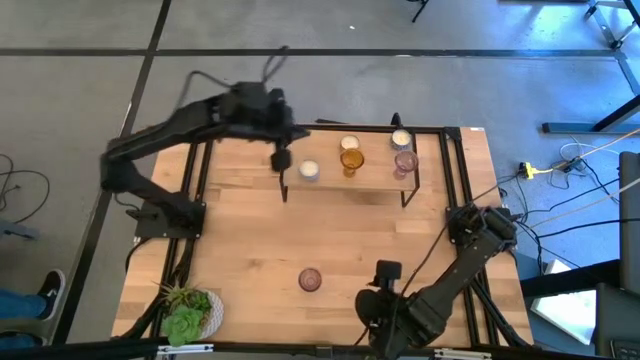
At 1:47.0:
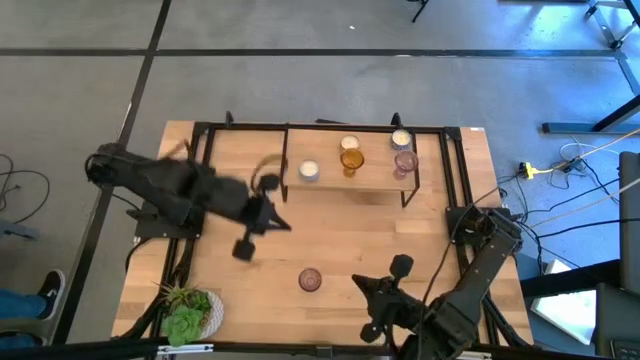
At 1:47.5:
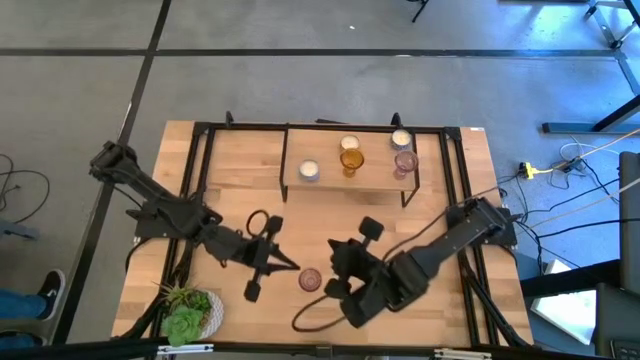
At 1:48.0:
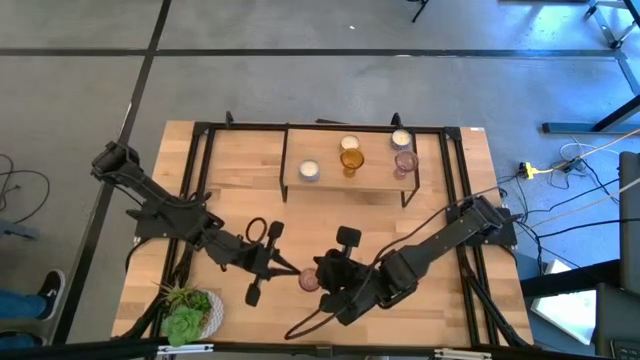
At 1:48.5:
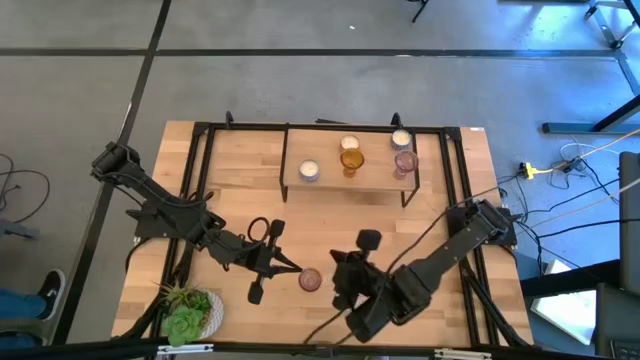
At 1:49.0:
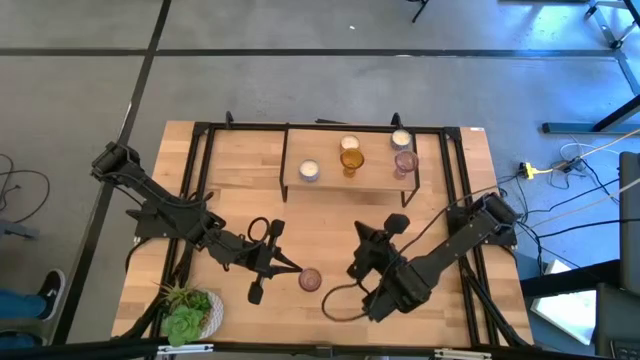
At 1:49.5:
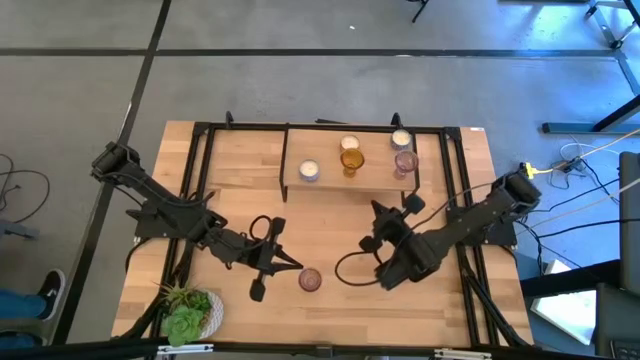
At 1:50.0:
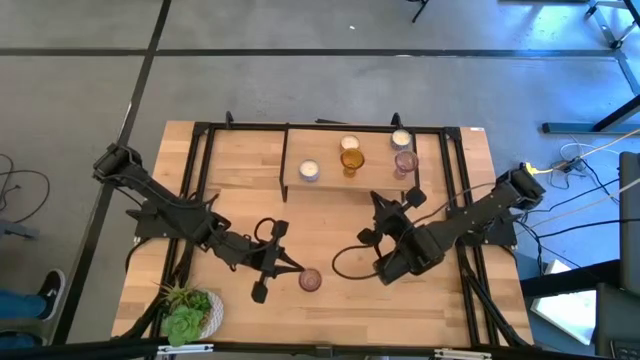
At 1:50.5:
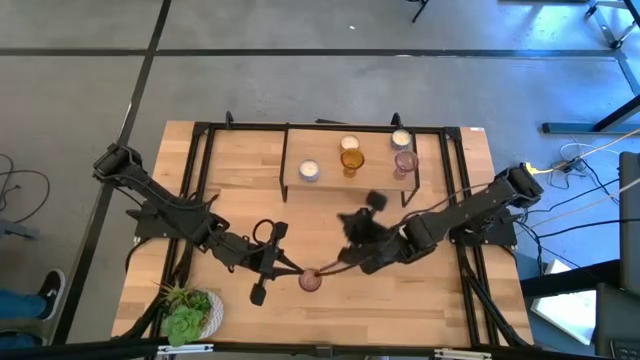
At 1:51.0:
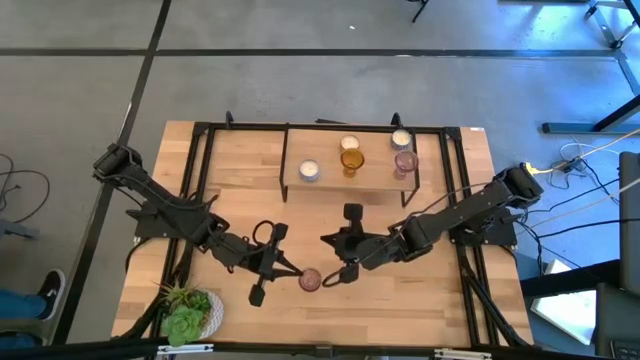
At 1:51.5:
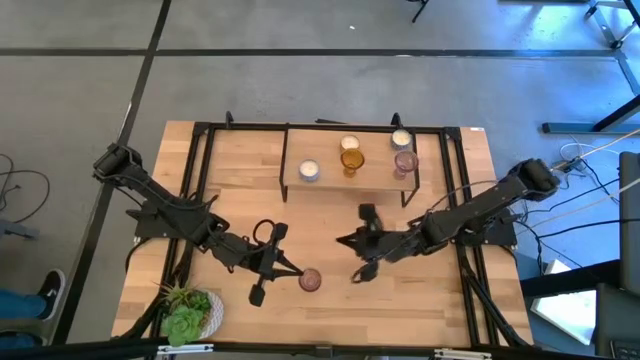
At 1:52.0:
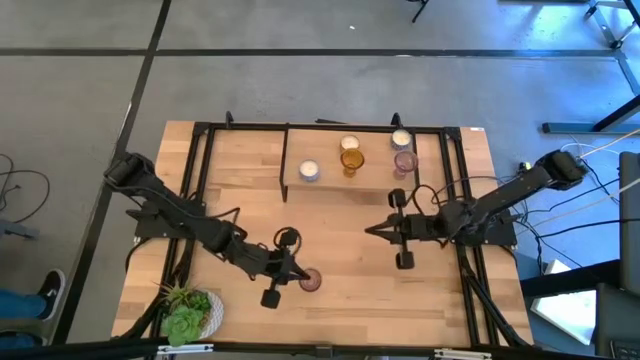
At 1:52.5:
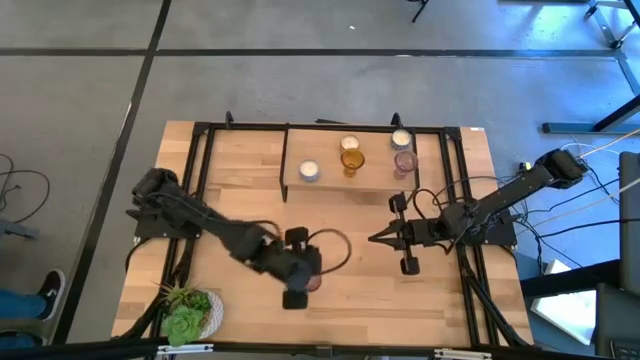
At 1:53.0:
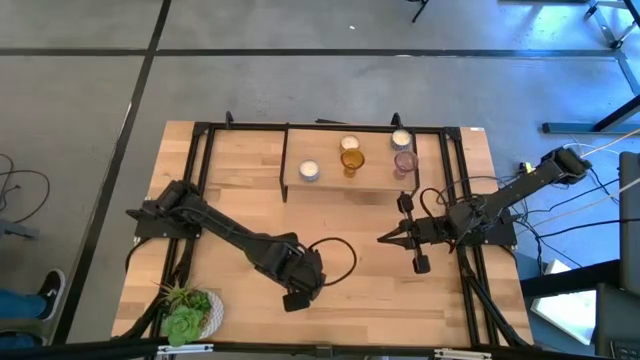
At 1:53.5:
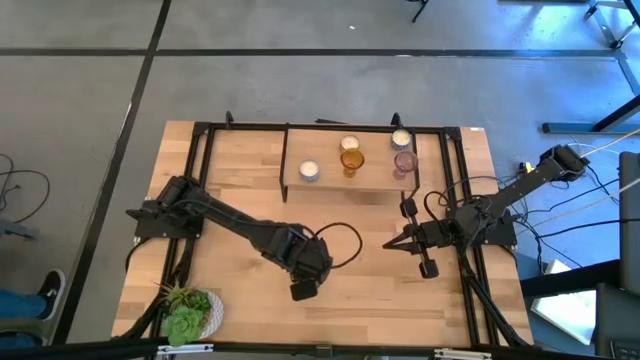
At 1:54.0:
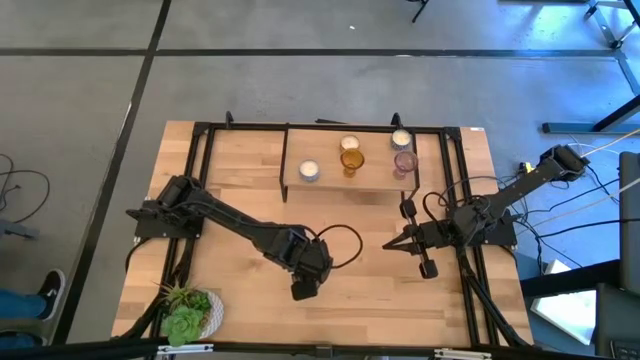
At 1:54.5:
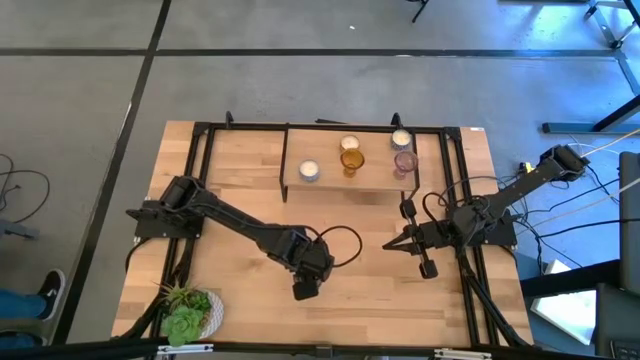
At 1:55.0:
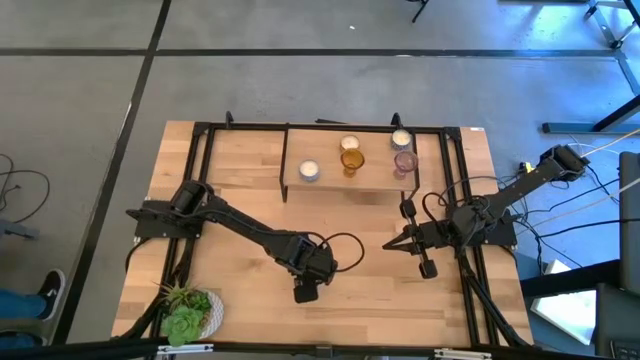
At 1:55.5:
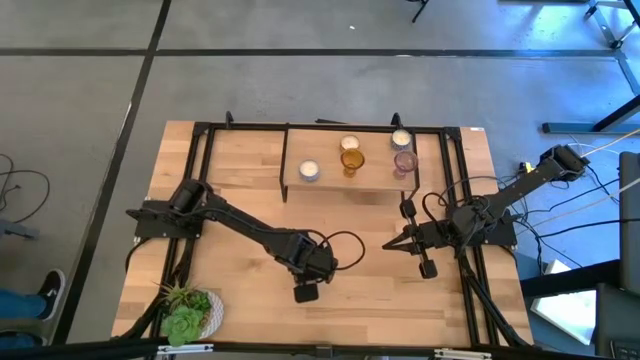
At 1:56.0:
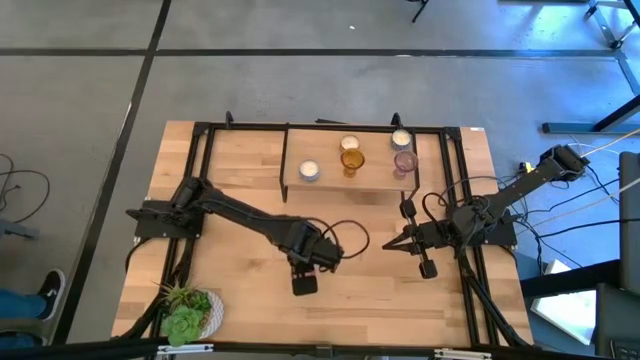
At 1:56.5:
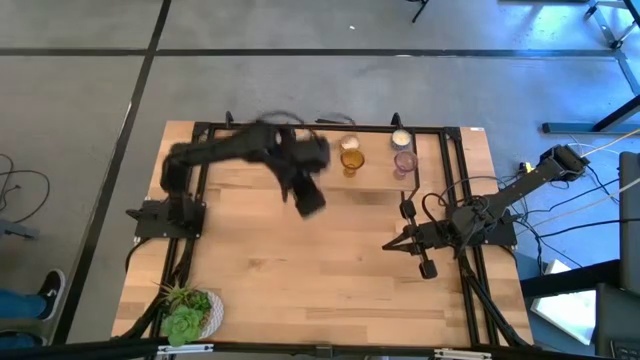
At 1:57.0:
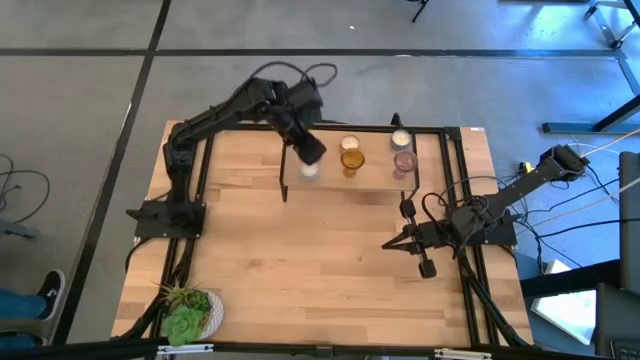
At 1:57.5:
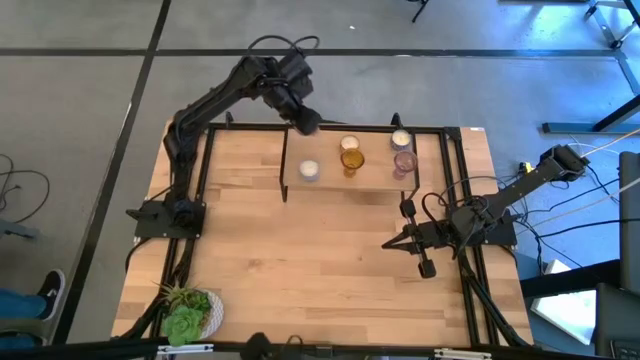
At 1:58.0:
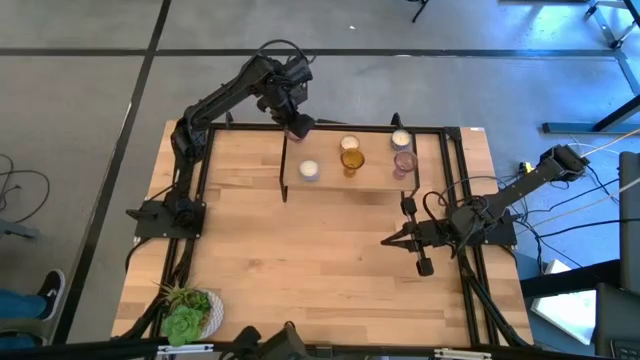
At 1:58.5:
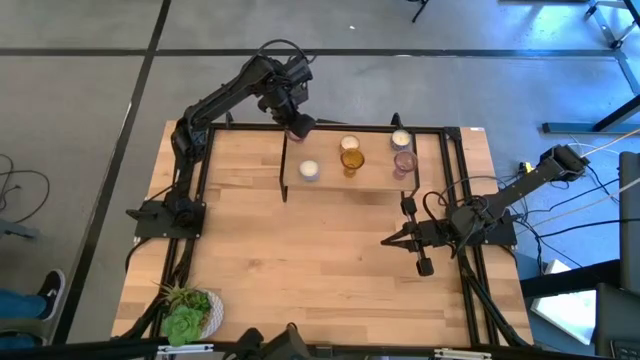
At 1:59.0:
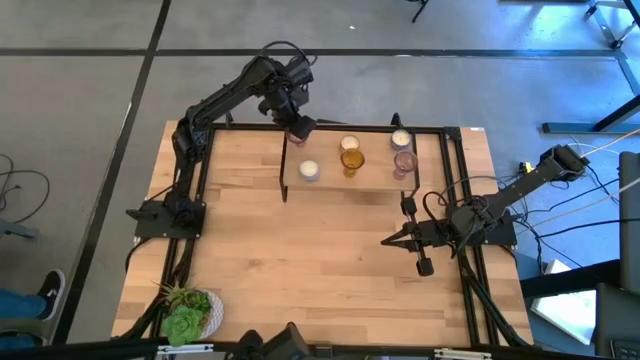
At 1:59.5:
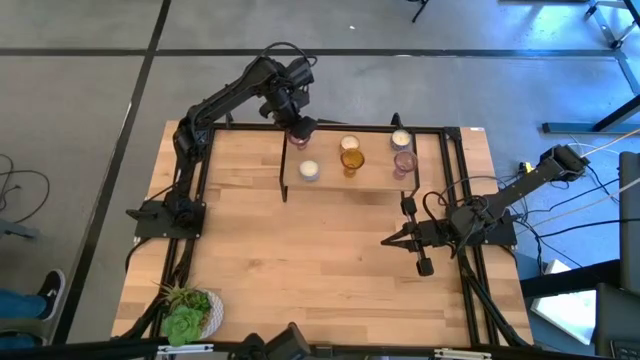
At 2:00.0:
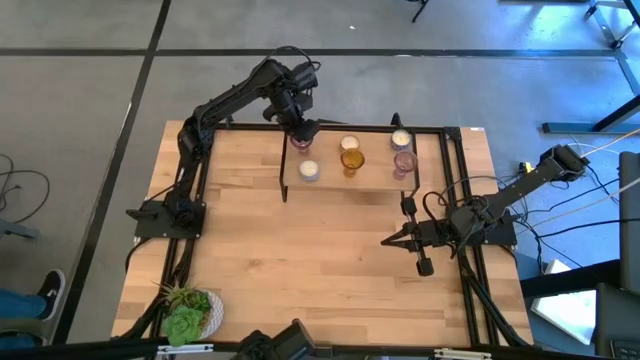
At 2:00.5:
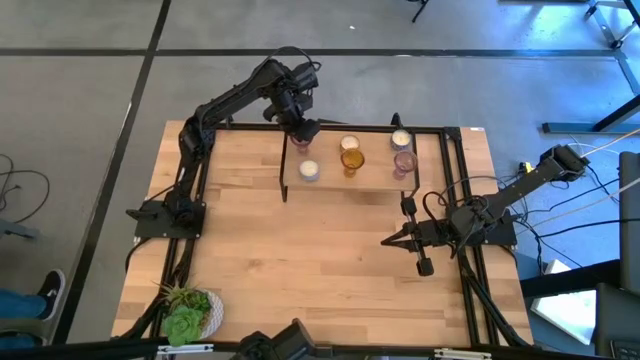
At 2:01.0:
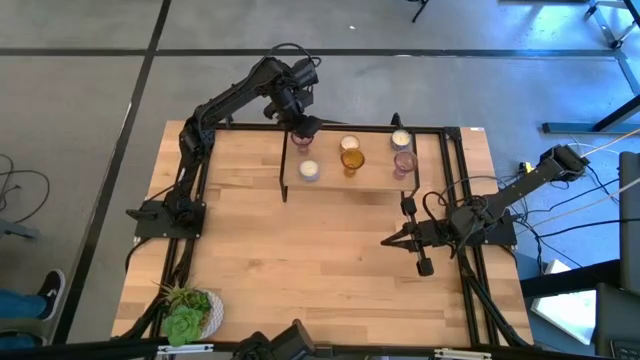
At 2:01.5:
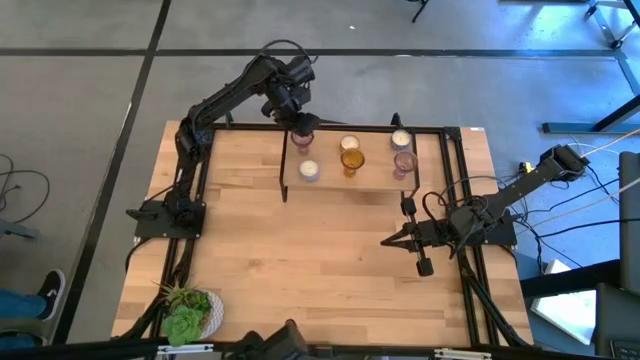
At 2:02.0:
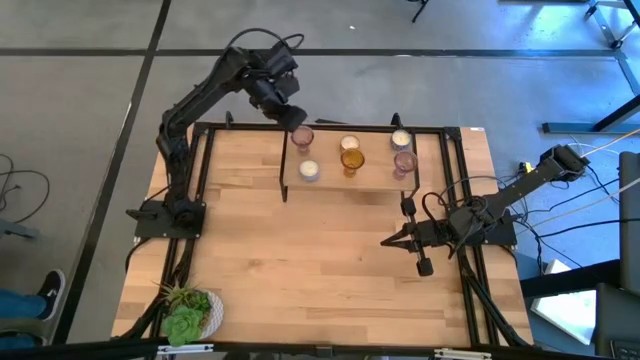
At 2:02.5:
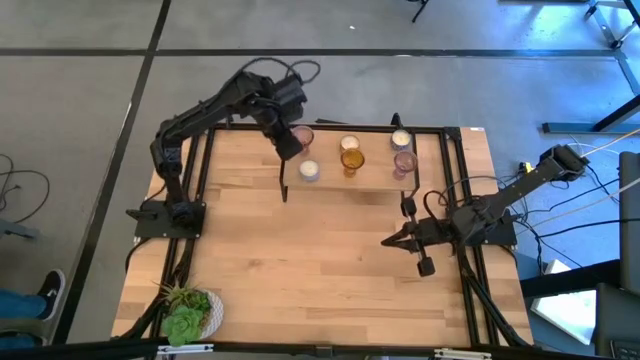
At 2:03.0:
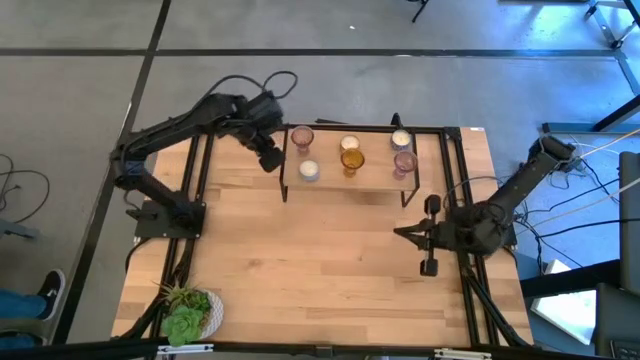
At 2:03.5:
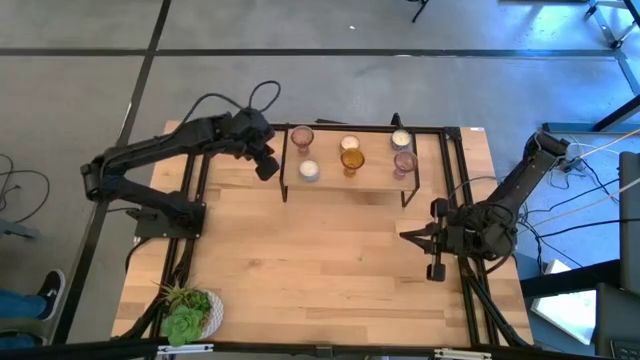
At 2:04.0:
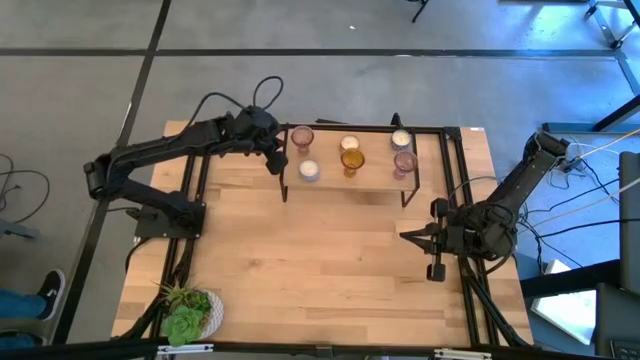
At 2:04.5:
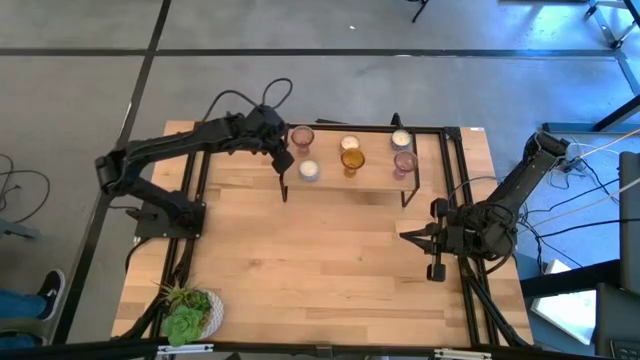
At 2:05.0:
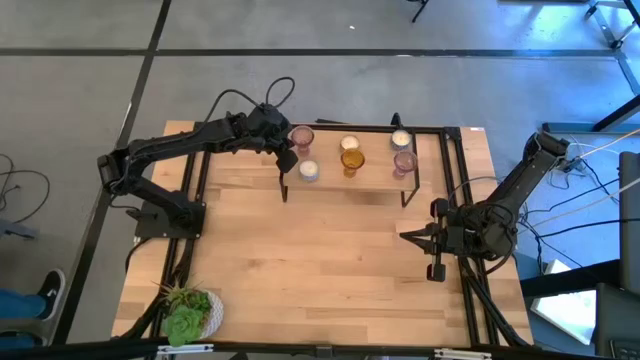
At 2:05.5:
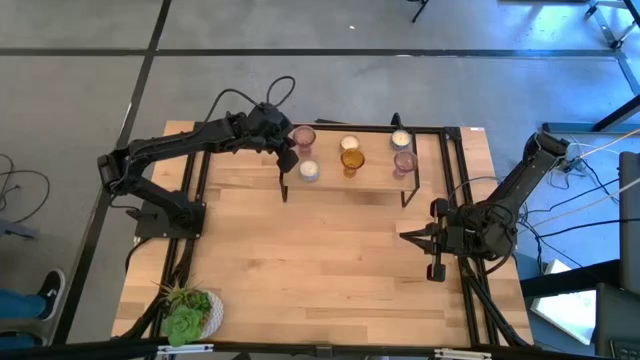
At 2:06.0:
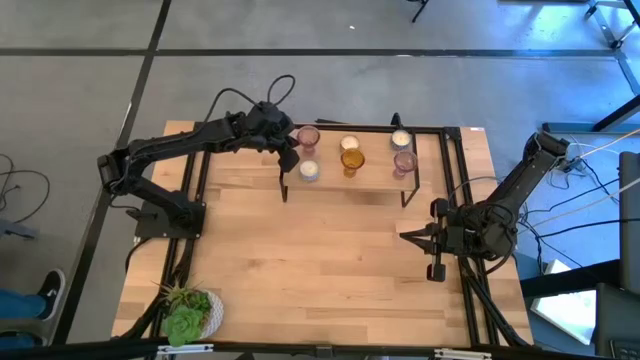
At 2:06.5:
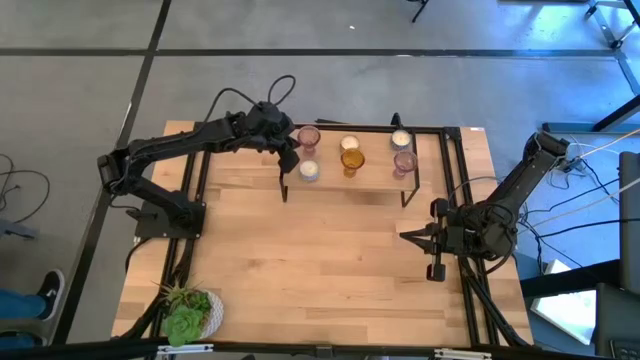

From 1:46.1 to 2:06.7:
Task: Pick & Place candle stick holders
Put the violet candle holder on the shelf aligned with the light blue candle
